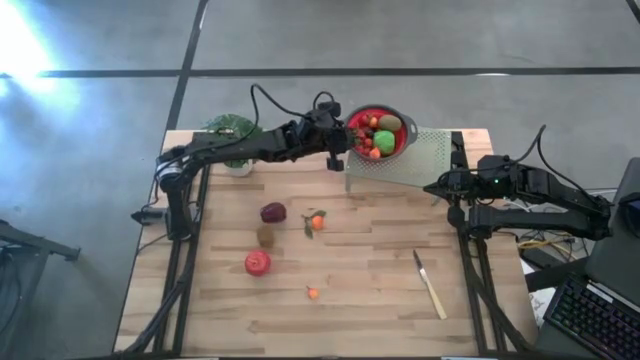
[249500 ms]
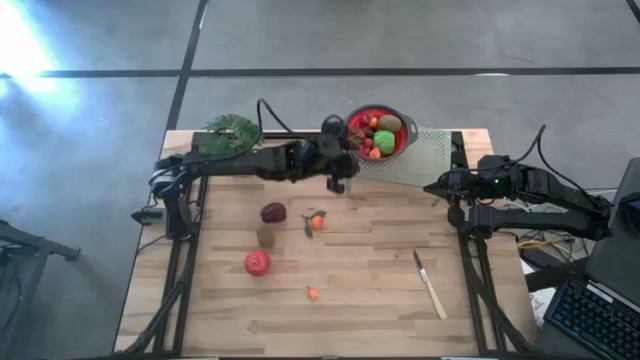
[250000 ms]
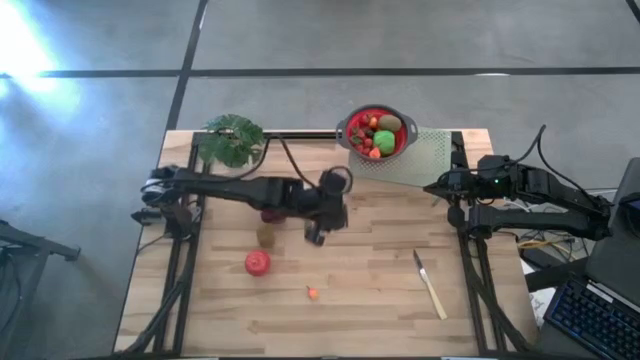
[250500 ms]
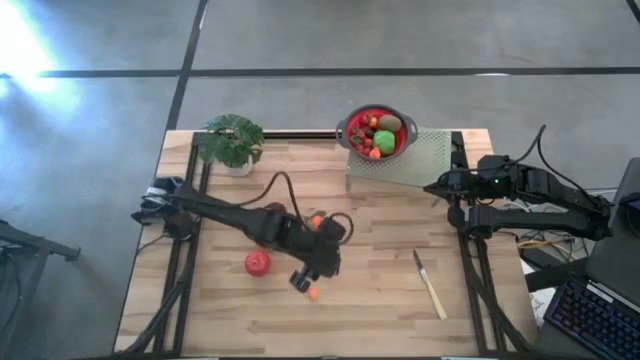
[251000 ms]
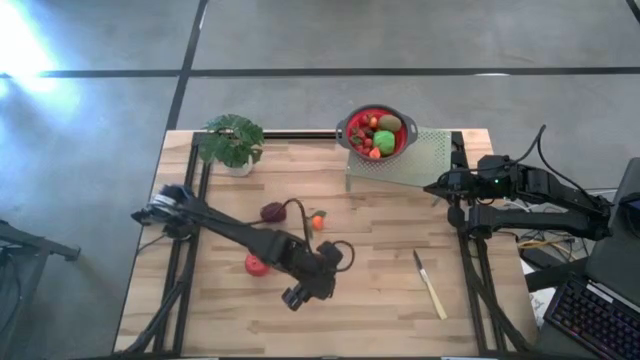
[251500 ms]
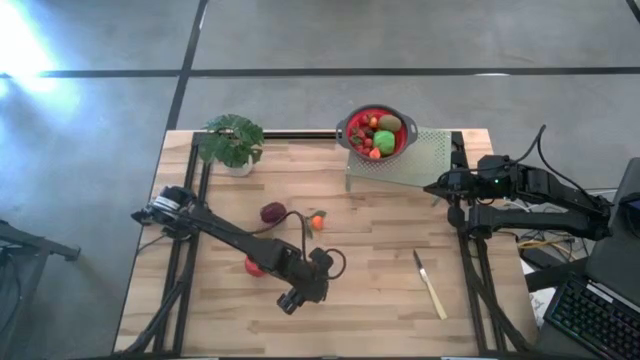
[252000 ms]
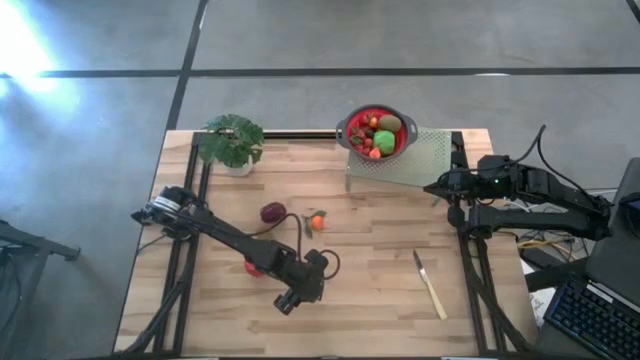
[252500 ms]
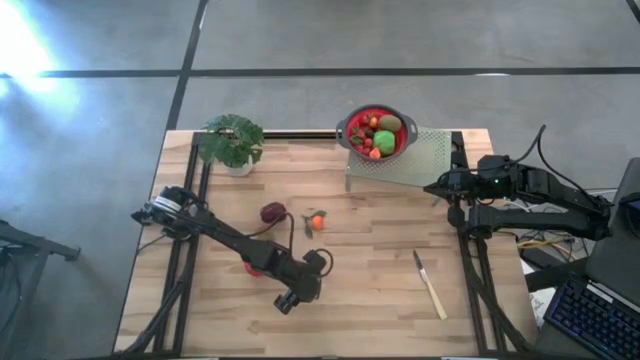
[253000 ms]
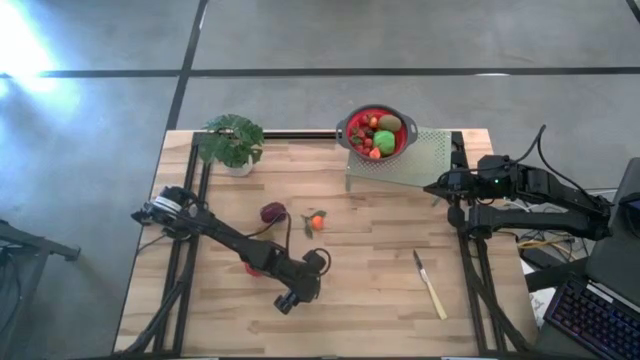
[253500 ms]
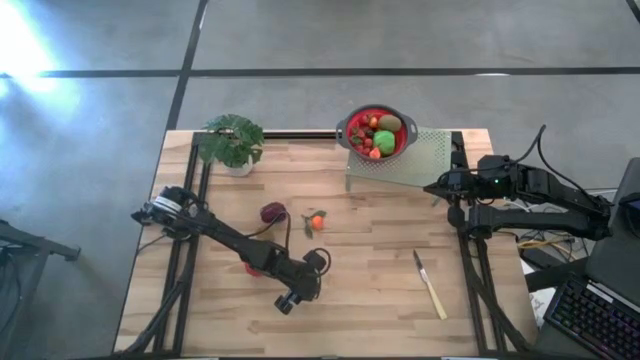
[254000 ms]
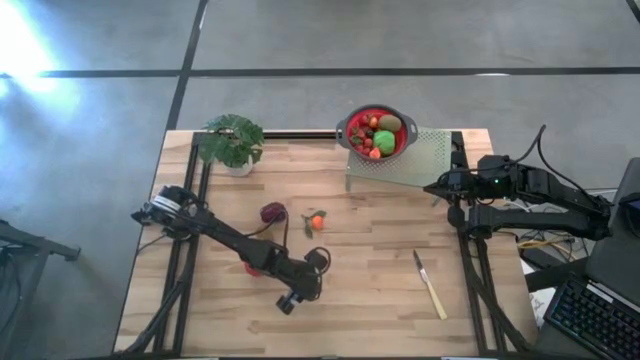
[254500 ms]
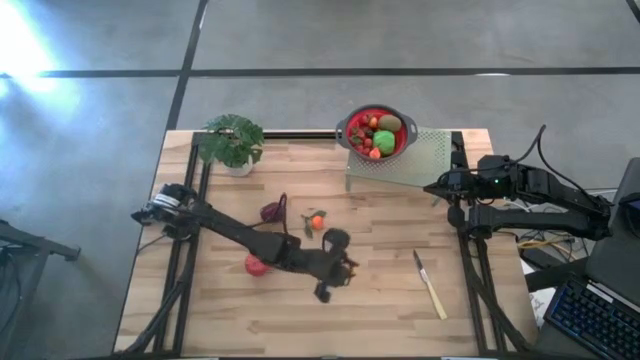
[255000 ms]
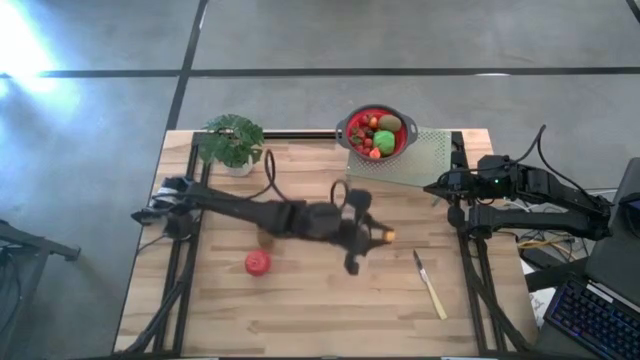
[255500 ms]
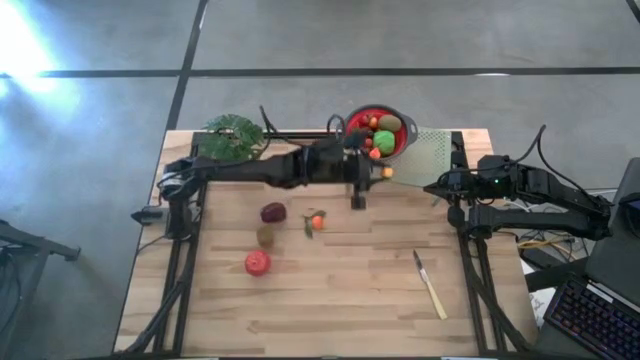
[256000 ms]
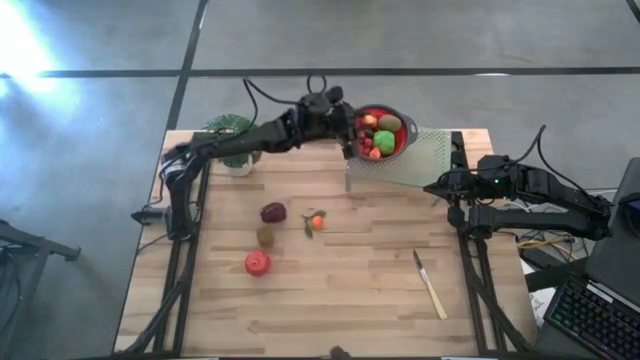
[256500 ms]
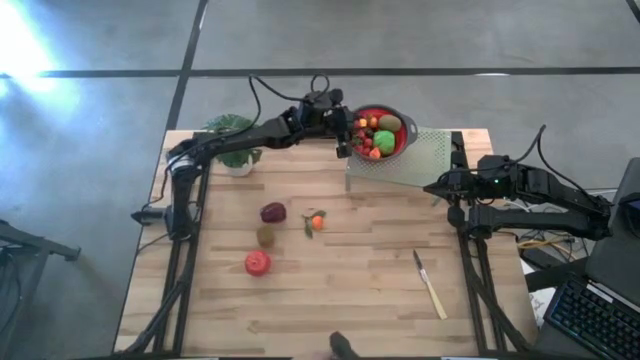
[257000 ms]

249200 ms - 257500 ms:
Task: Pick & Place Fruit
Put the pear into the strainer bowl on the shelf

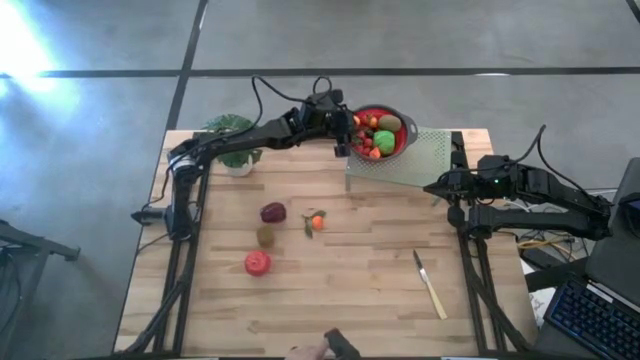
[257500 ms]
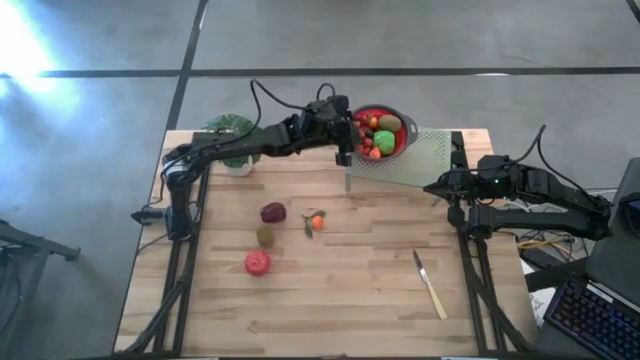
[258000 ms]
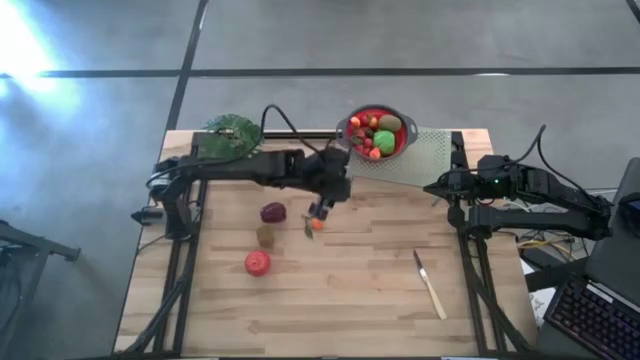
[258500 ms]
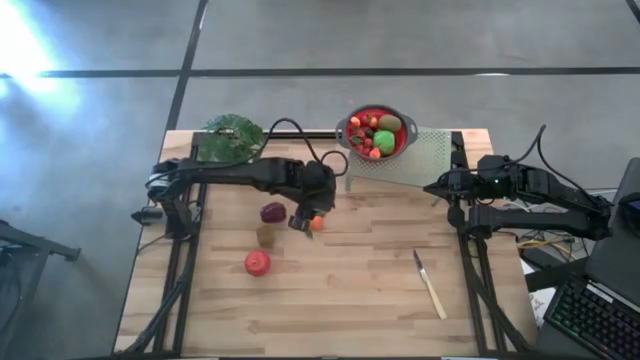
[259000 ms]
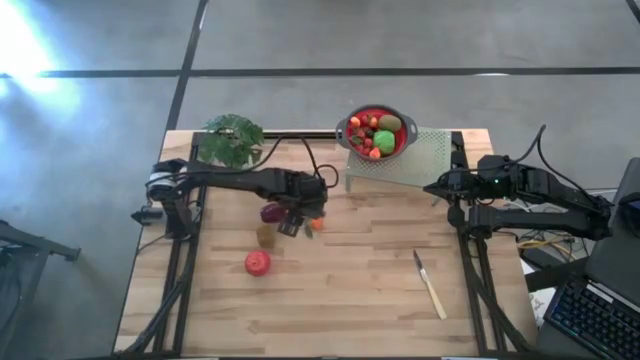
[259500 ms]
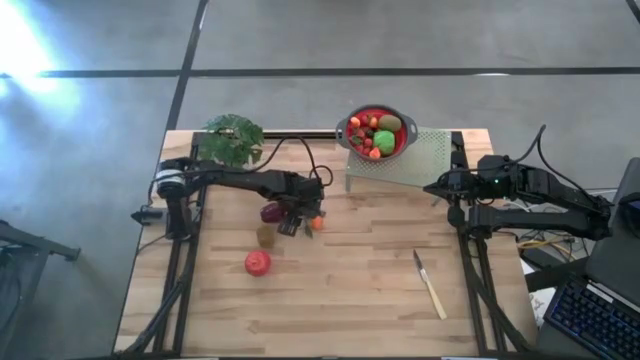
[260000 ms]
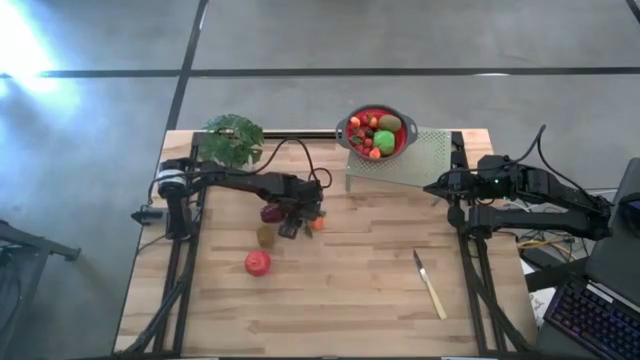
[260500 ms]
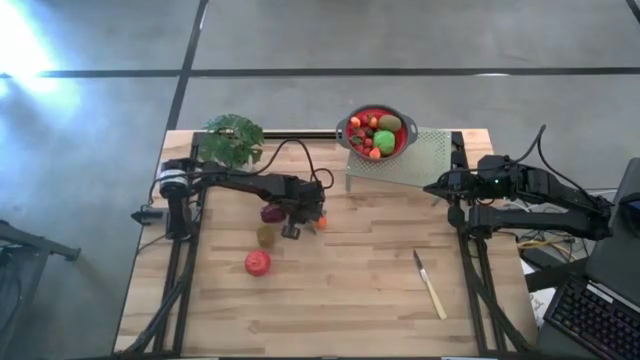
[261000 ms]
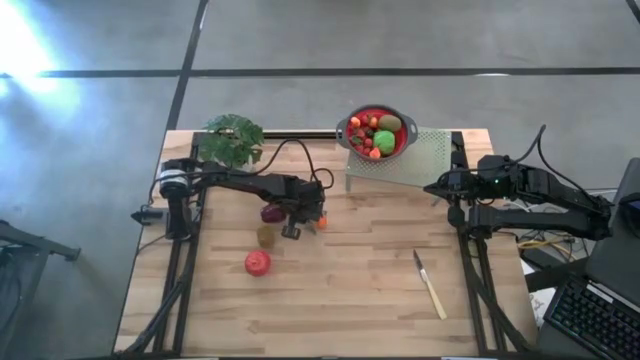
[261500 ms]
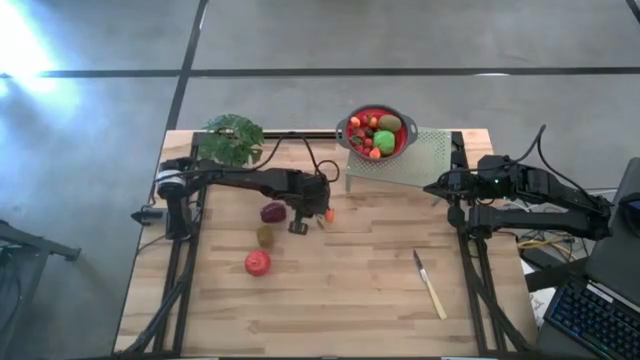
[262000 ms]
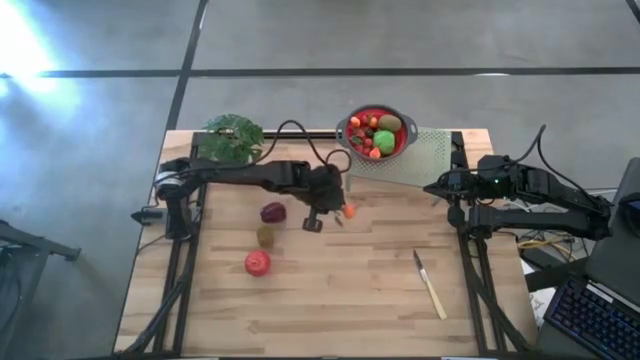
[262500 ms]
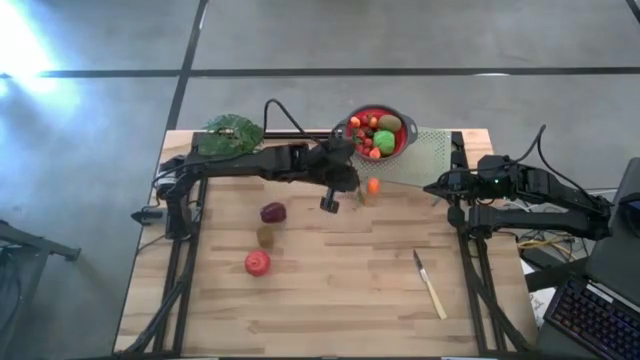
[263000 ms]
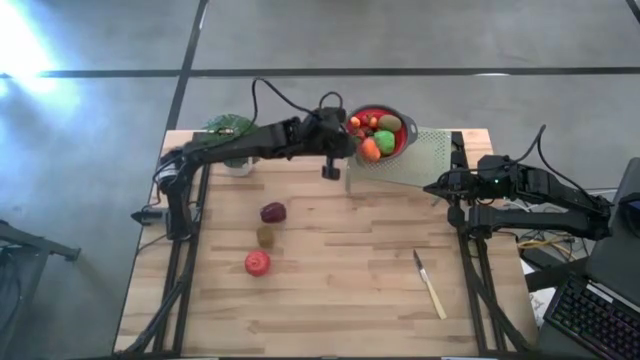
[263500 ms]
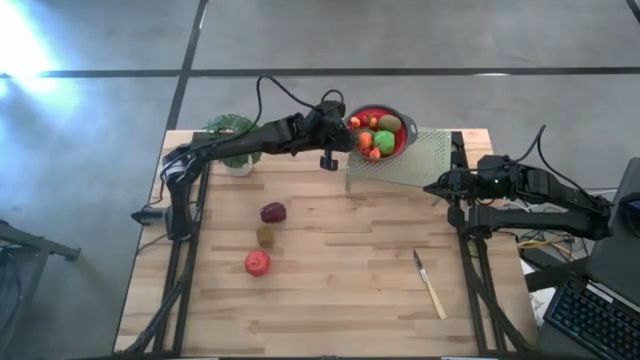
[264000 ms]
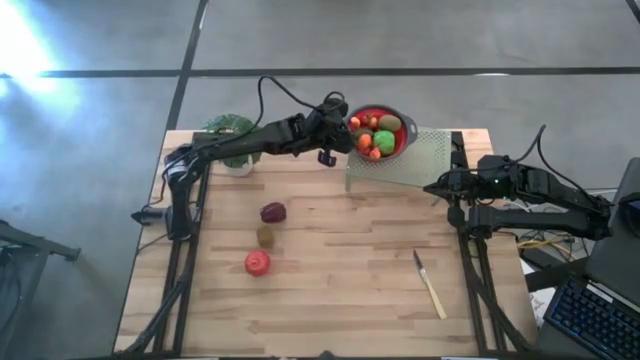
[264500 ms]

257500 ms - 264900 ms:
Put the orange into the strainer bowl on the shelf

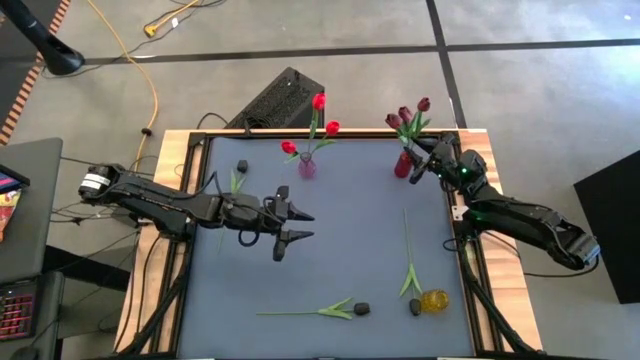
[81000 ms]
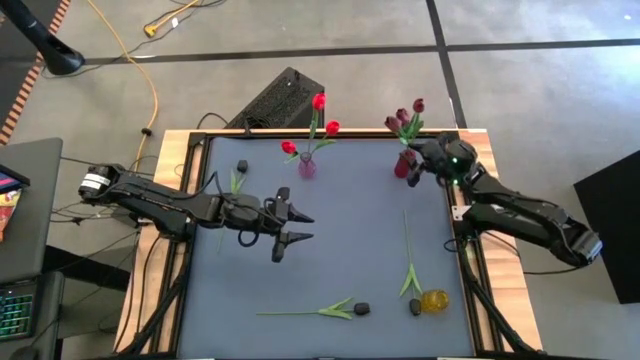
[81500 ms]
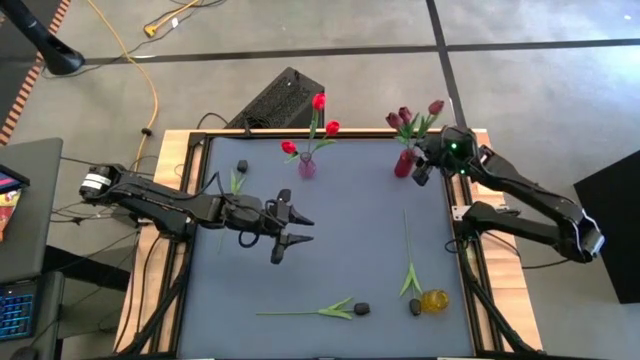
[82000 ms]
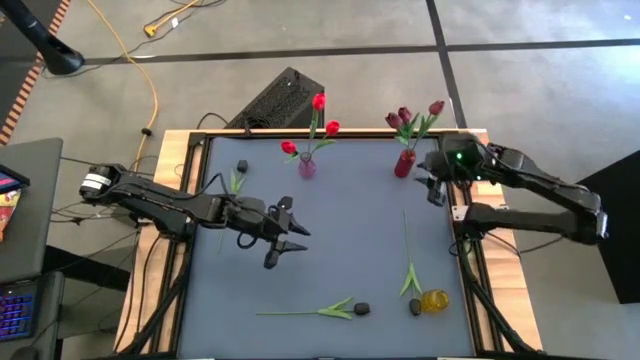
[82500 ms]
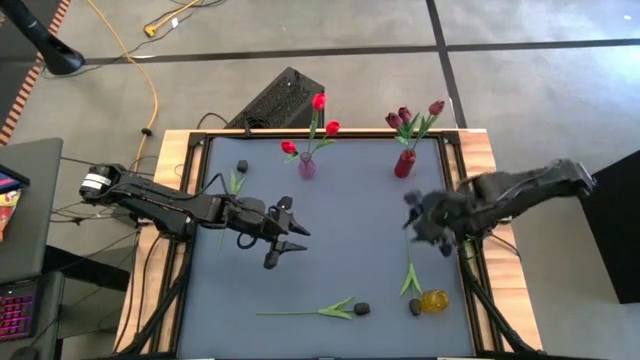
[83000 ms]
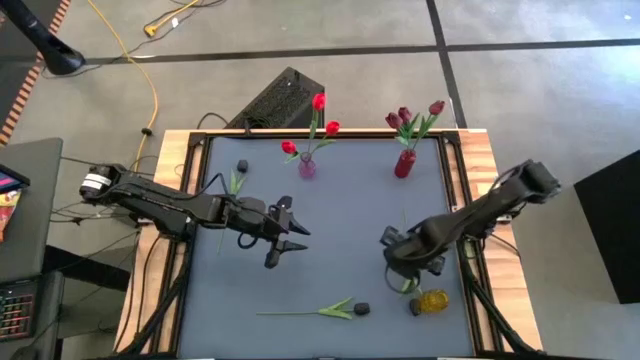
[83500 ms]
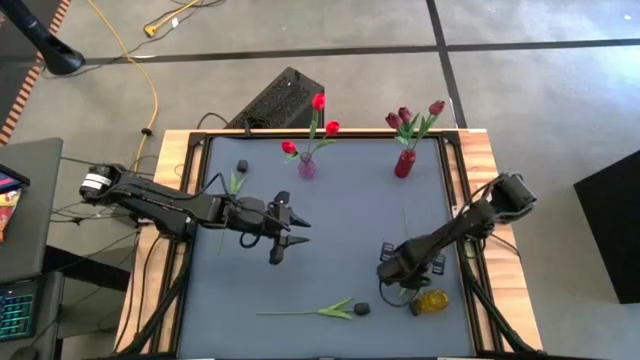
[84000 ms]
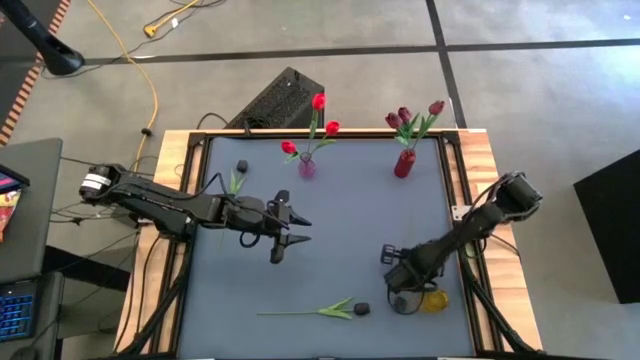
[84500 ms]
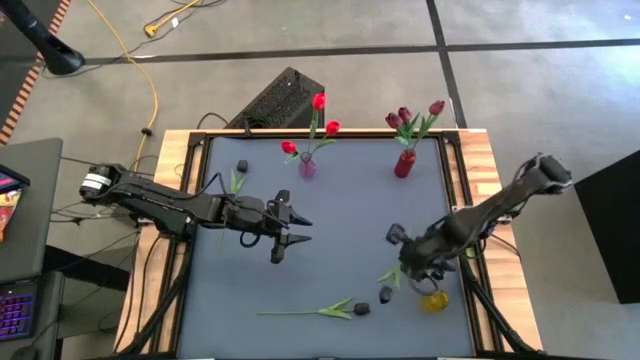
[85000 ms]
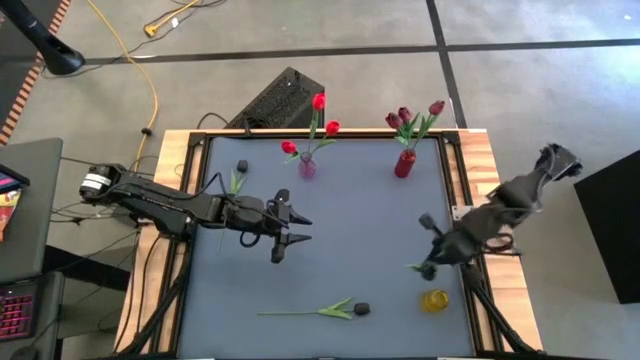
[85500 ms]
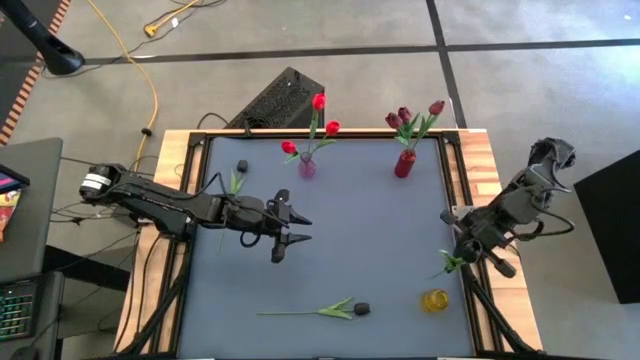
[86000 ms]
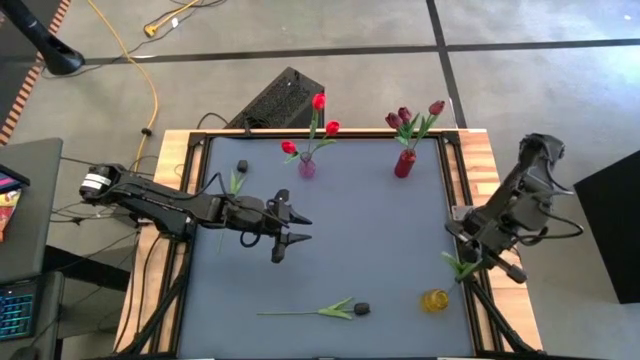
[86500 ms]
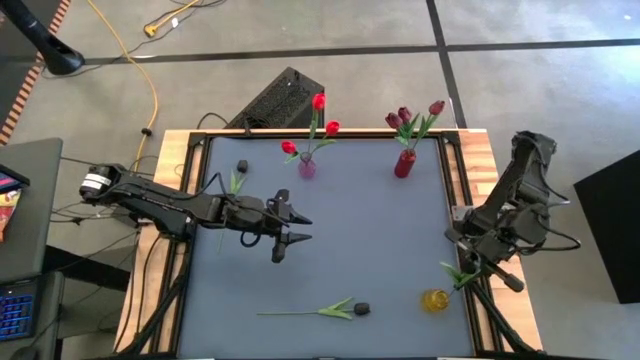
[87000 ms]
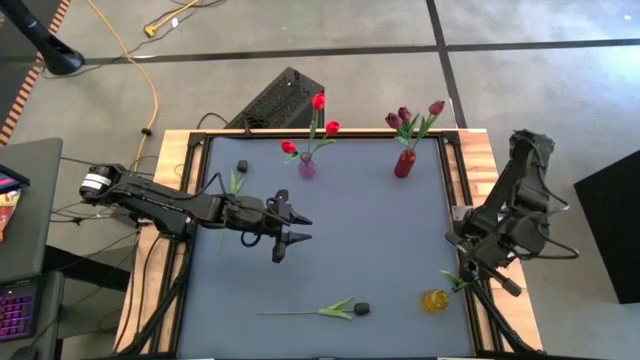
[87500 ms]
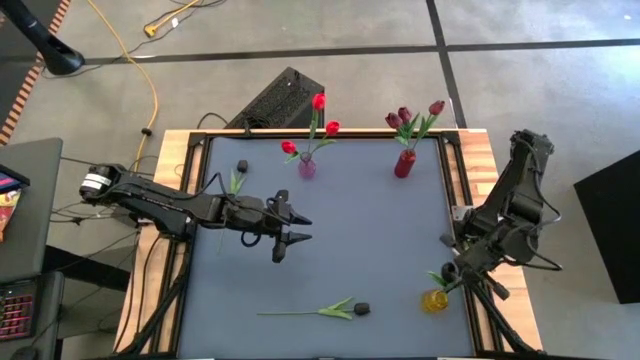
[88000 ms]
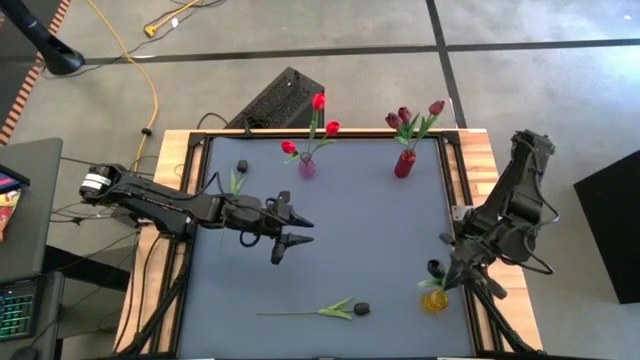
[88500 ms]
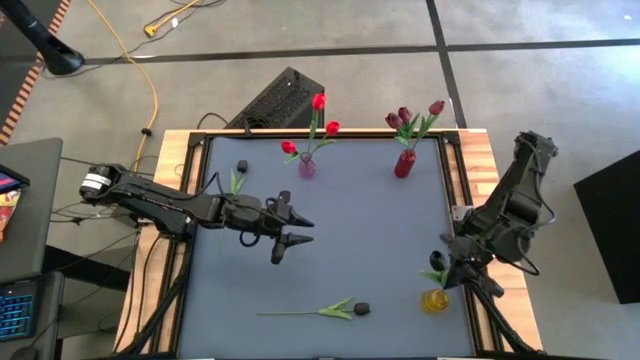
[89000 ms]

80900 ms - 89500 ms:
Task: Sort flowers into vase by color
Put the bottom right black flower into the yellow vase
